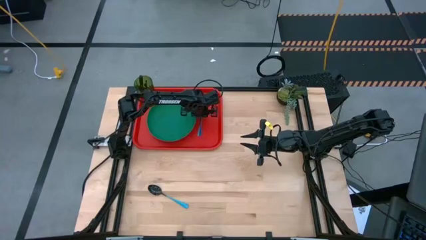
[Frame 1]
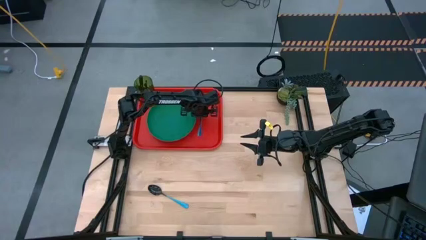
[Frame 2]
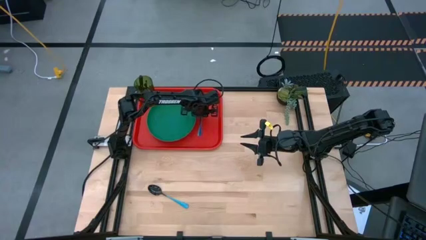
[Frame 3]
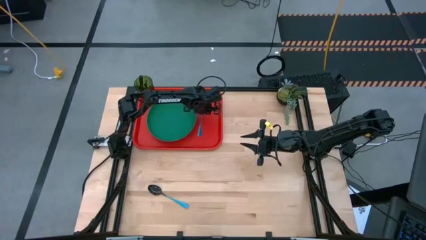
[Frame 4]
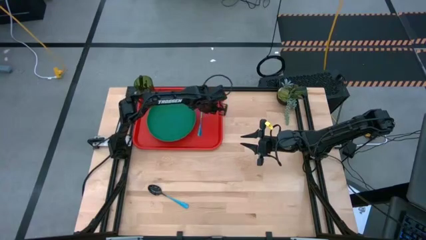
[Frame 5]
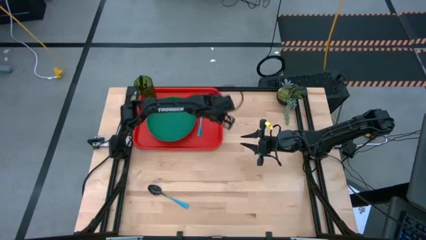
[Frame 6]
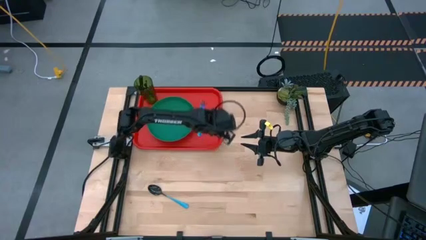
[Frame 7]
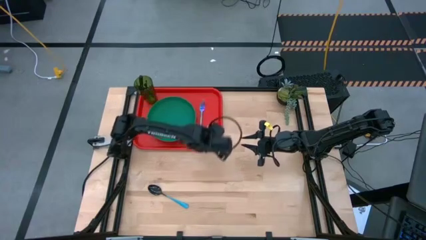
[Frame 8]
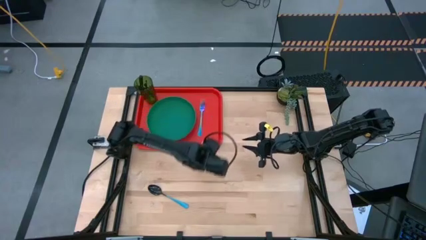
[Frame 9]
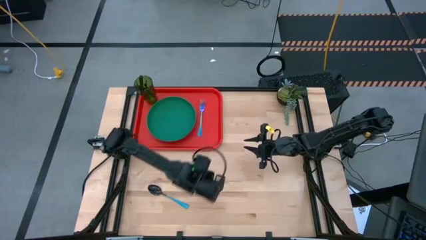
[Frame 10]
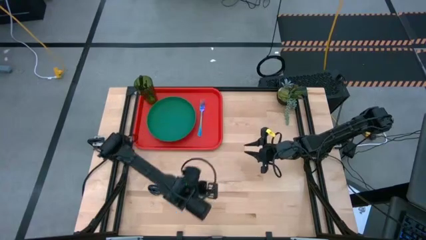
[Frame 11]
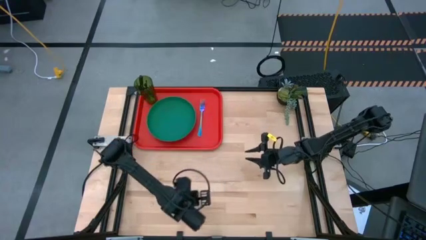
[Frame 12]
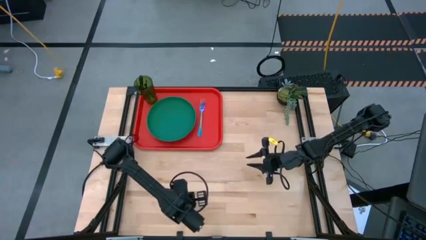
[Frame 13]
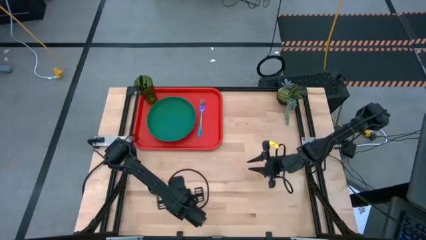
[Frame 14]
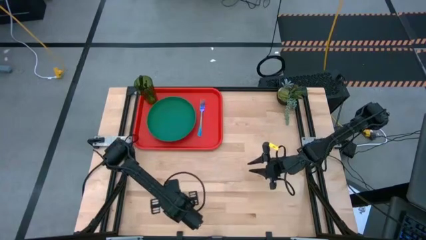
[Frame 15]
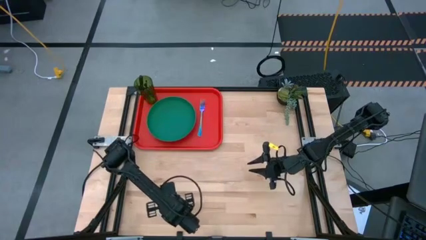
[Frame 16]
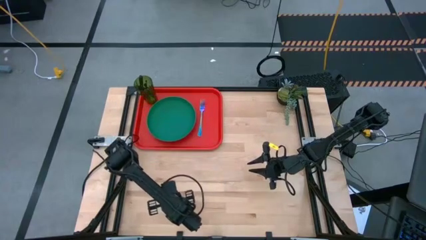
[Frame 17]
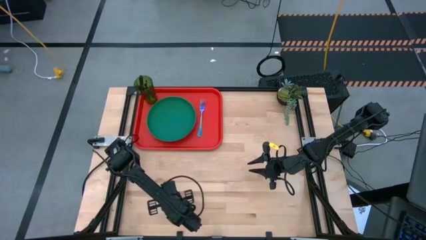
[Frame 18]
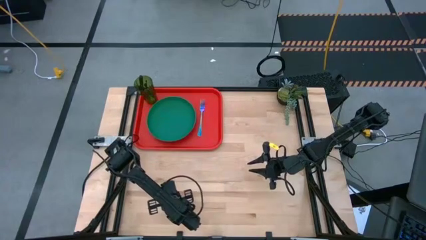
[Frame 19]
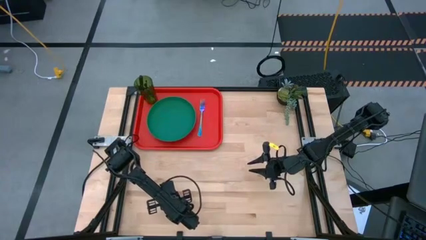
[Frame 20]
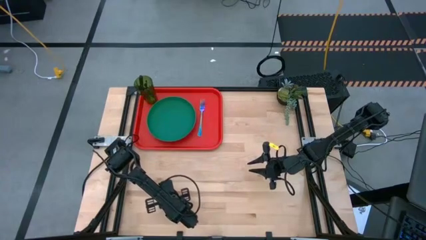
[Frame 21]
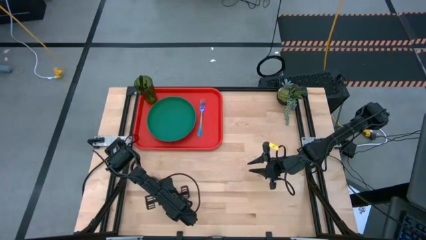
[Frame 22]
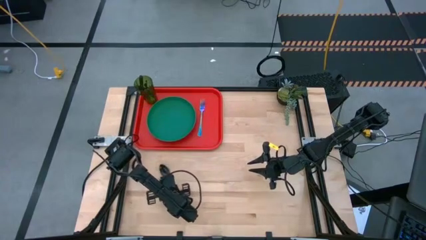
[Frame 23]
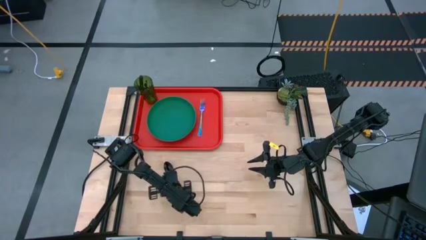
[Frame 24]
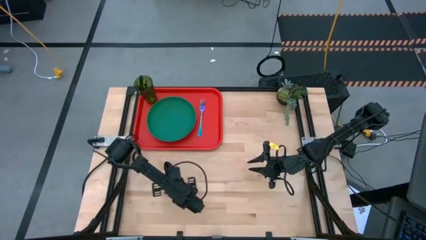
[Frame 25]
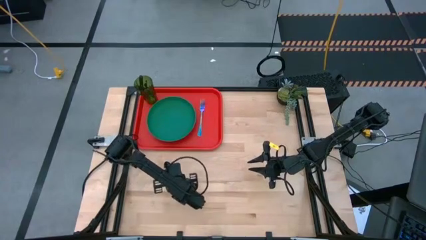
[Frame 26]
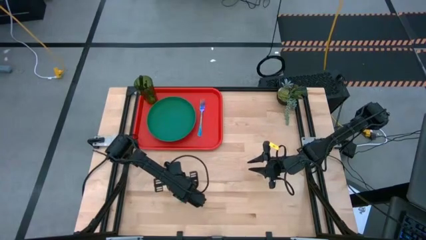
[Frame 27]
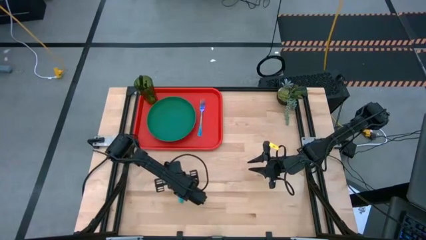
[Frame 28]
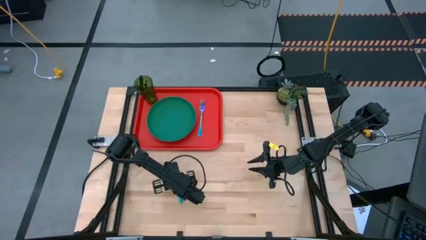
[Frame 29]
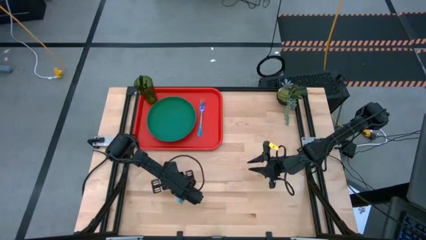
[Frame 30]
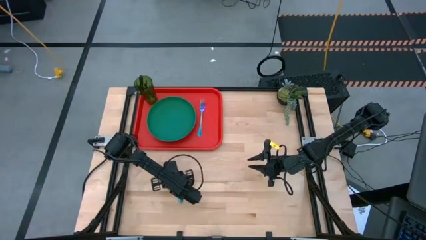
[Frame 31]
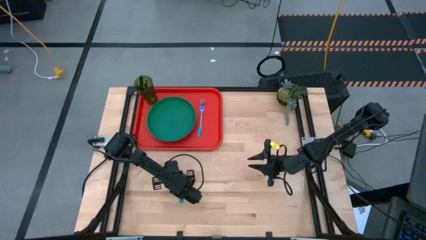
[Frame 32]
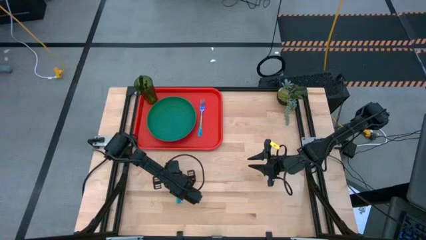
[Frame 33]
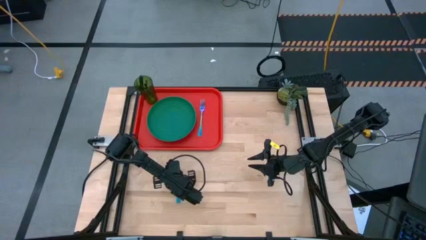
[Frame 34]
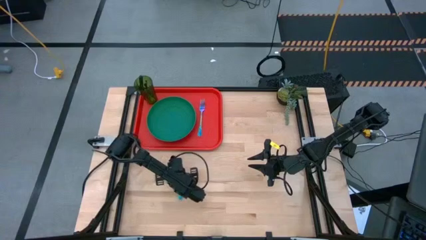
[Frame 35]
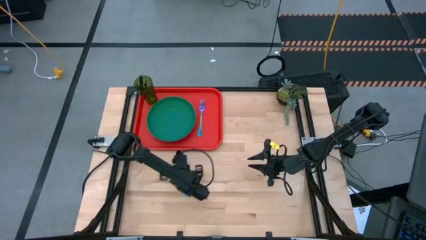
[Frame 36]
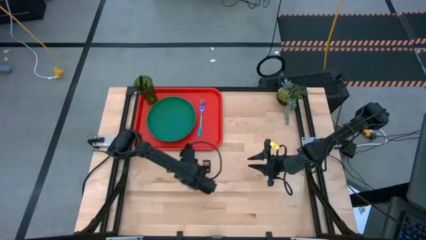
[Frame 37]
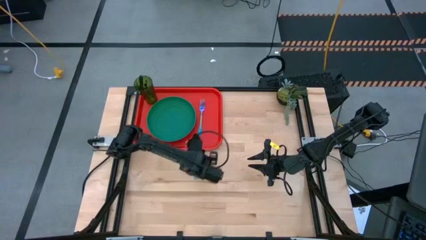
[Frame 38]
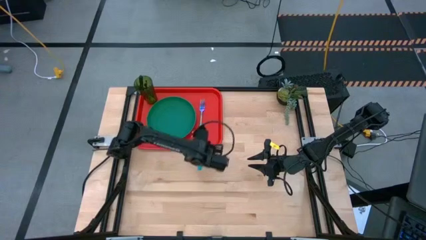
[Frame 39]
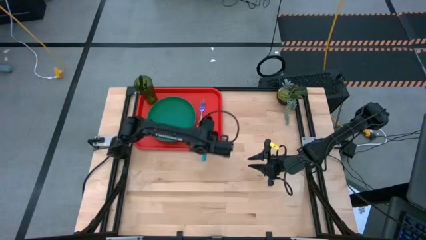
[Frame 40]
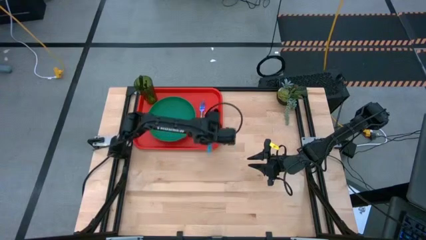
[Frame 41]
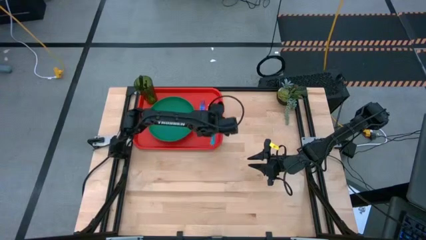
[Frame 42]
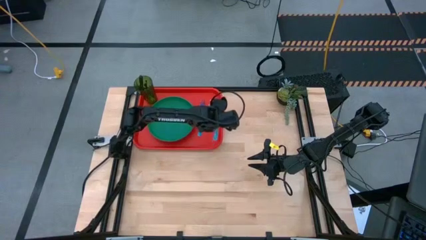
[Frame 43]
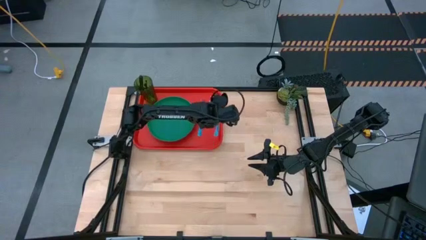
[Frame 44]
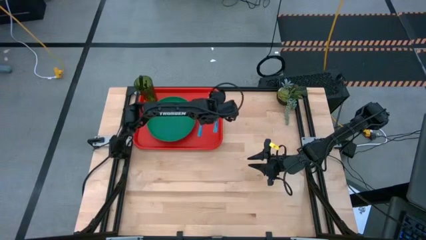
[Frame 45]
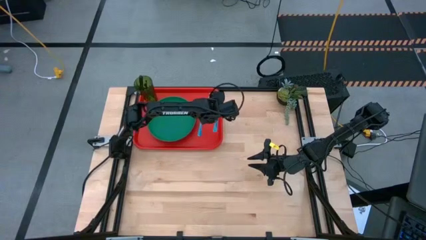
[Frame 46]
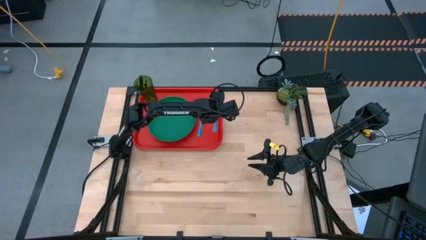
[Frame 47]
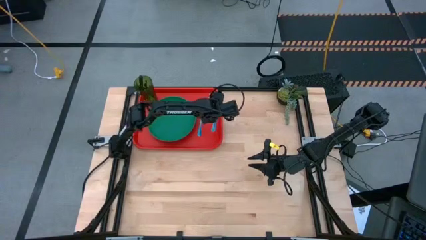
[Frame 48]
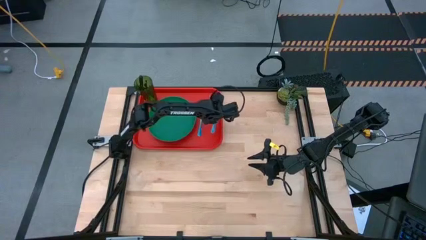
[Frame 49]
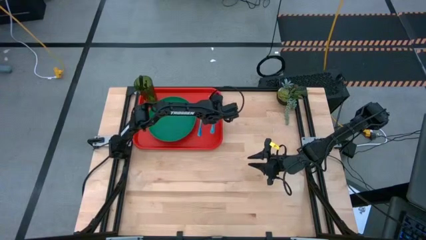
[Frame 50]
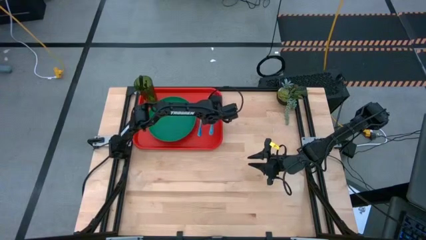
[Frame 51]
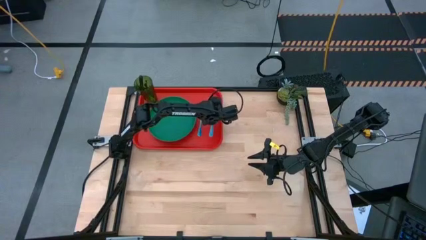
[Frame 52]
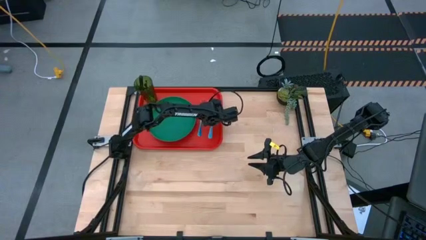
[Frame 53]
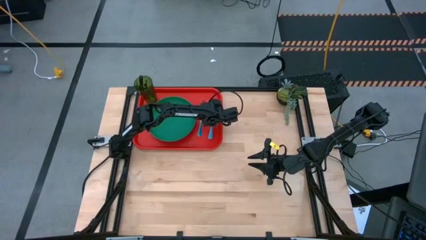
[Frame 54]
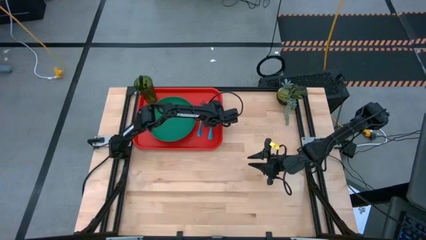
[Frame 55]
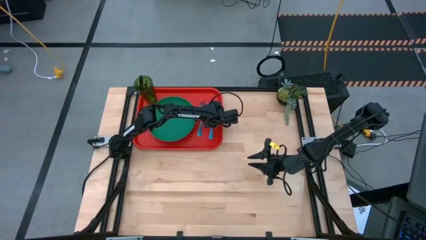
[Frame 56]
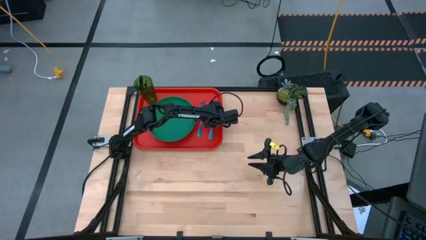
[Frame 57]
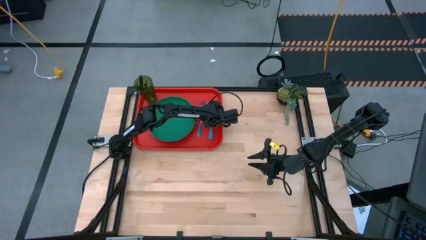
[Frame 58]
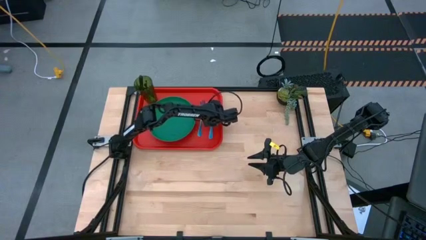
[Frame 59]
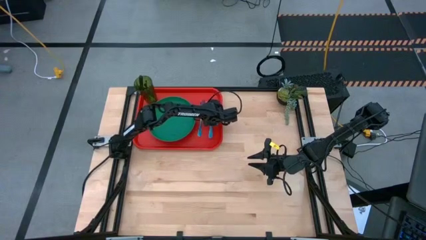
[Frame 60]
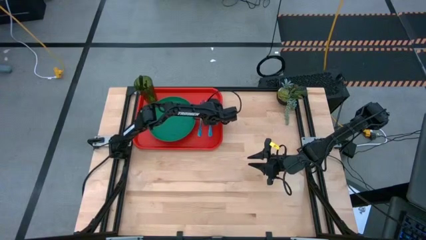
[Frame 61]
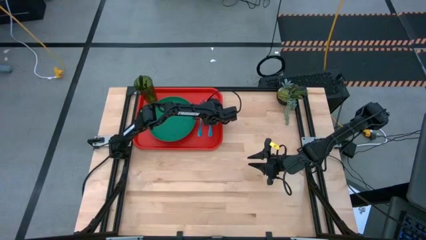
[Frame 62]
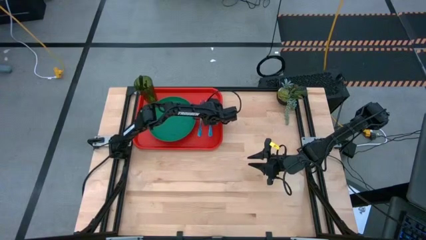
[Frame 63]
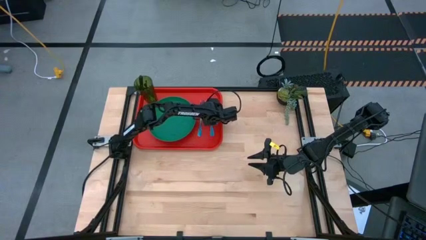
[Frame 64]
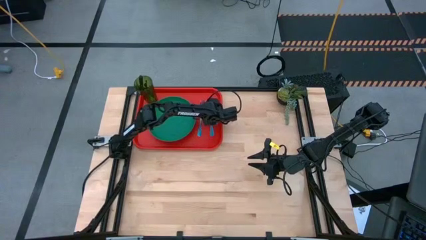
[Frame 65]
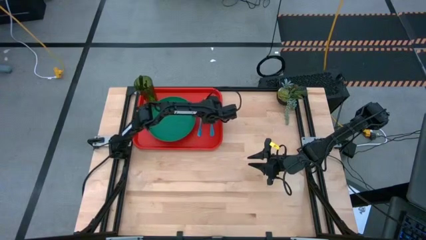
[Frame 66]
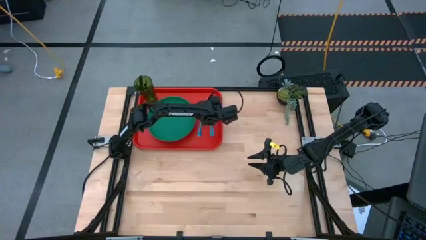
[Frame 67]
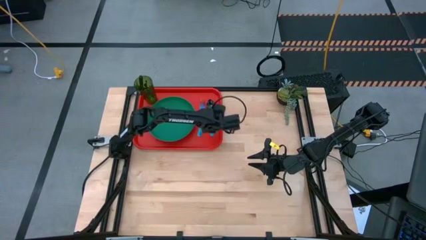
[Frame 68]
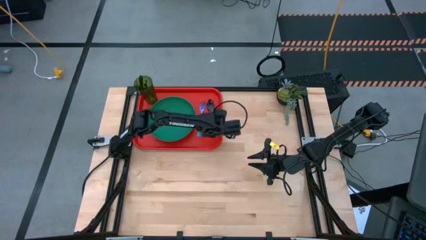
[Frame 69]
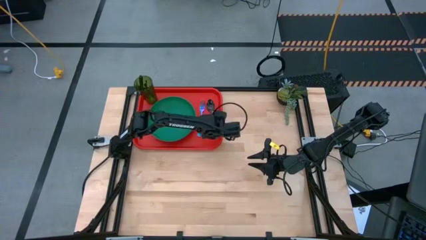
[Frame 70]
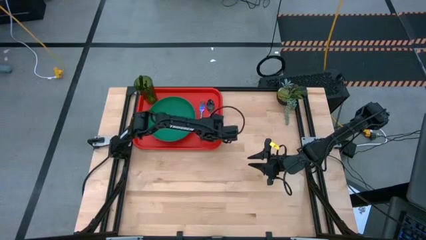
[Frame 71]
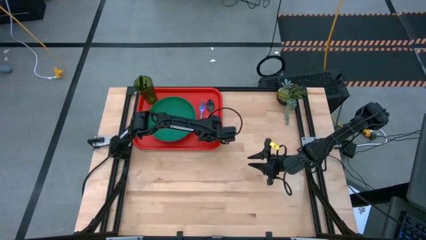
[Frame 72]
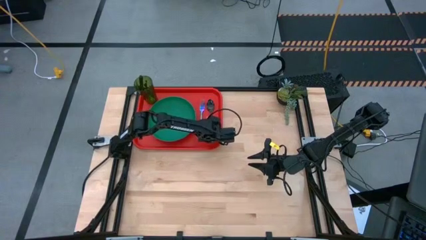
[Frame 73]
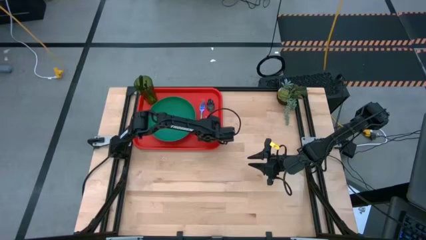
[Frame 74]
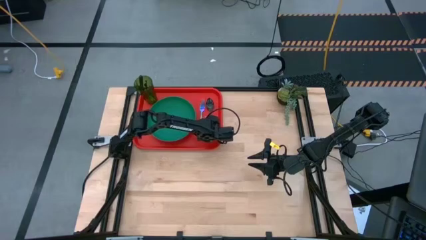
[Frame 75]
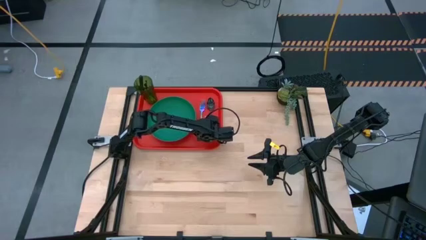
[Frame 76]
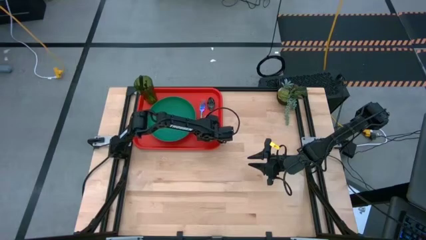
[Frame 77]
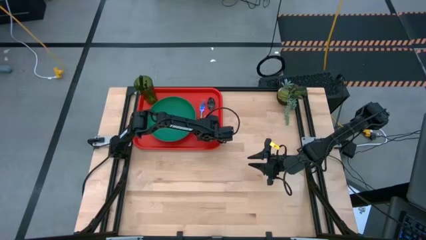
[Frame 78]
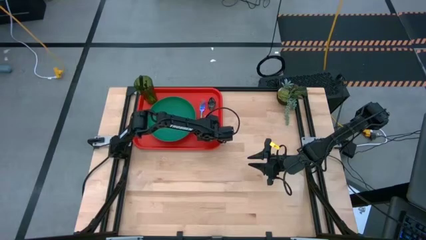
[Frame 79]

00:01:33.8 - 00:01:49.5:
Task: Pick and place plate/cup/fork/spoon on tray
Put the blue spoon on the orange tray to the right side of the blue fork

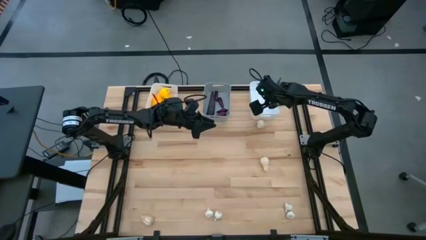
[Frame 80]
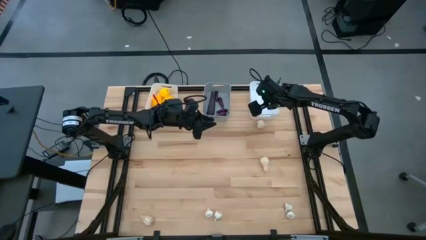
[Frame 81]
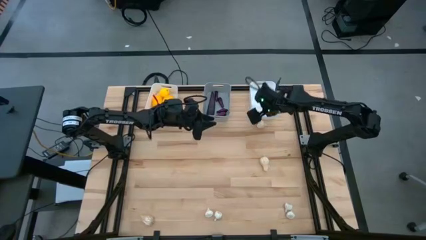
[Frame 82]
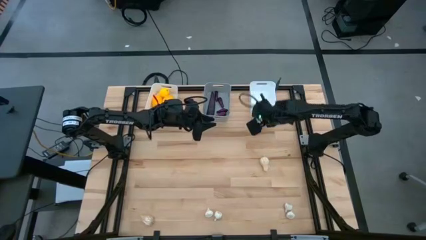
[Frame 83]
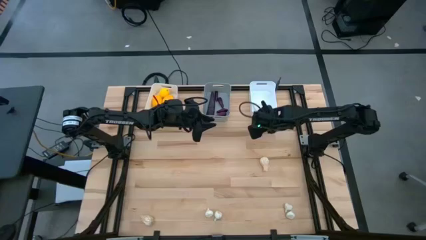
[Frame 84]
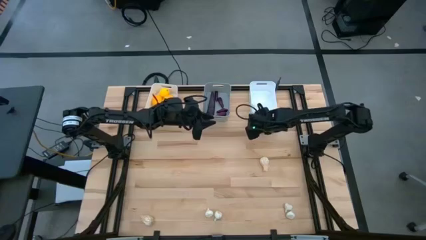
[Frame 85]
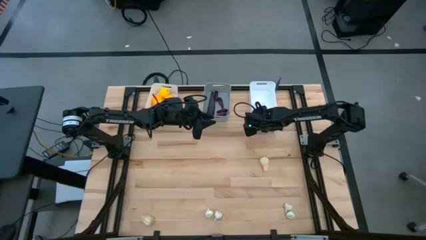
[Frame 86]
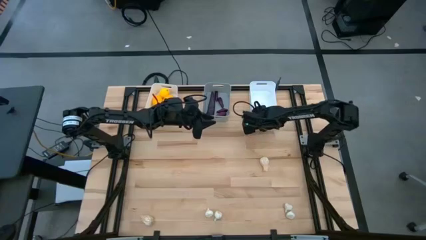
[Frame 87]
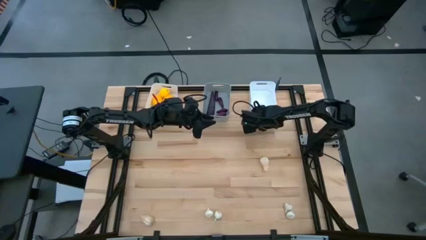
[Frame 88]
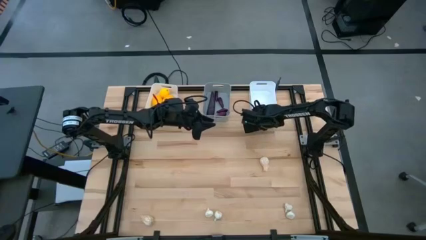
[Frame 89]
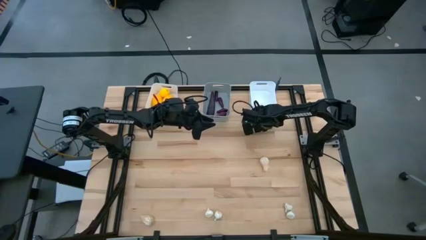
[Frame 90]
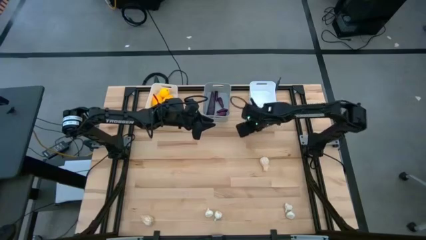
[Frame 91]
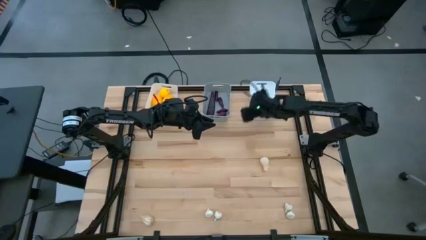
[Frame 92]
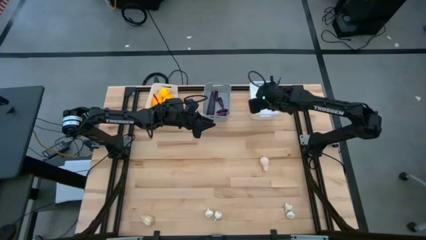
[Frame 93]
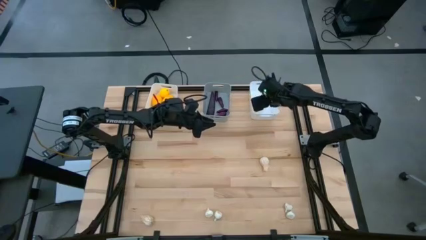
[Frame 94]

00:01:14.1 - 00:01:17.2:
Task: Sort produce into baskets
Put the garlic into the right white bin
